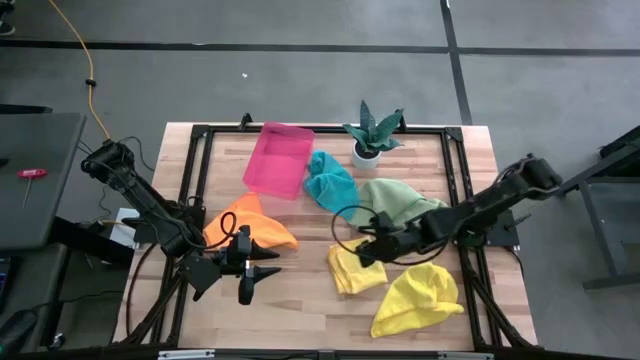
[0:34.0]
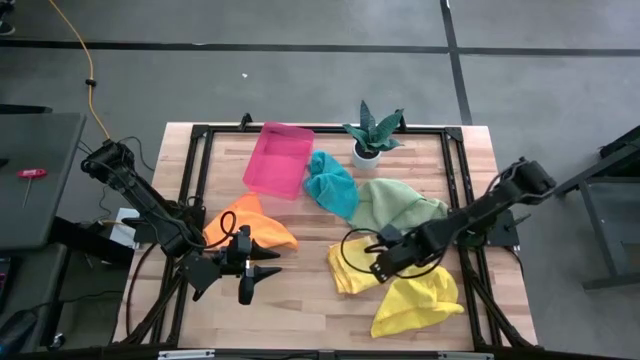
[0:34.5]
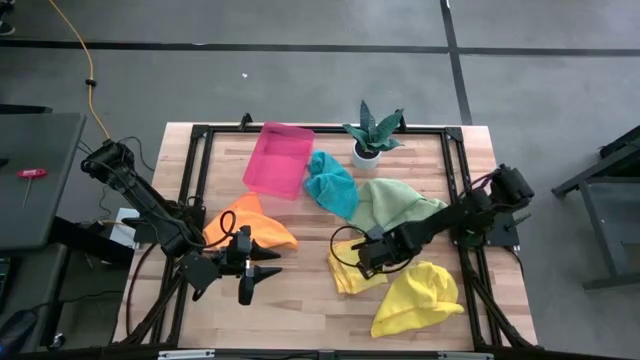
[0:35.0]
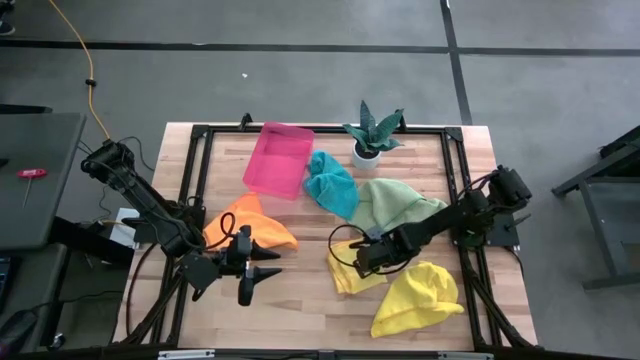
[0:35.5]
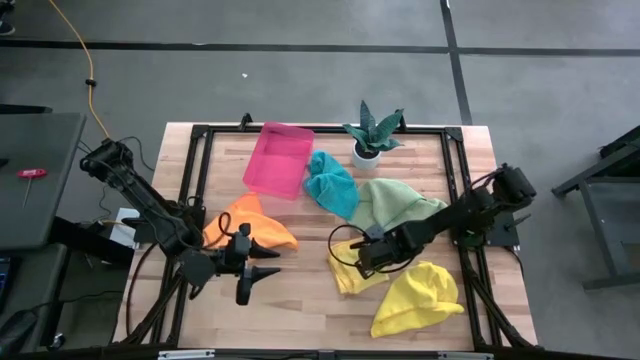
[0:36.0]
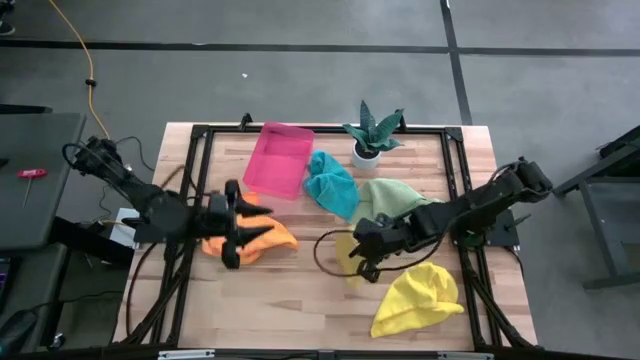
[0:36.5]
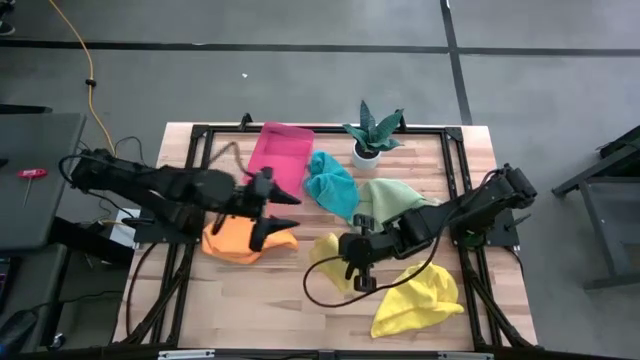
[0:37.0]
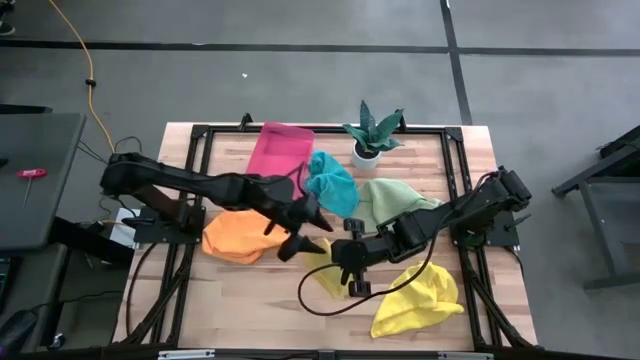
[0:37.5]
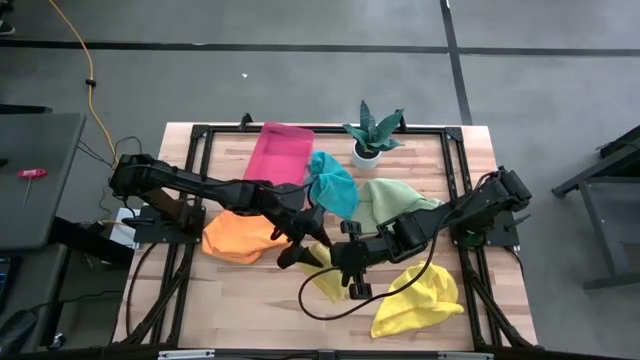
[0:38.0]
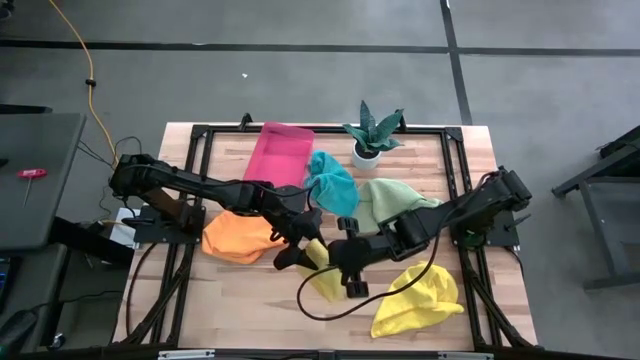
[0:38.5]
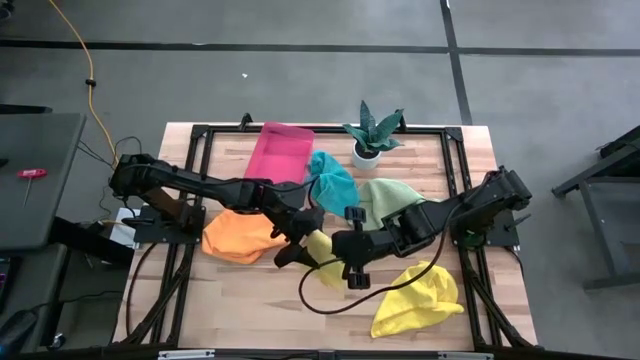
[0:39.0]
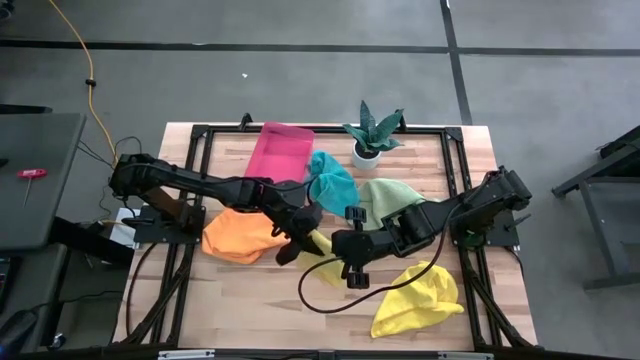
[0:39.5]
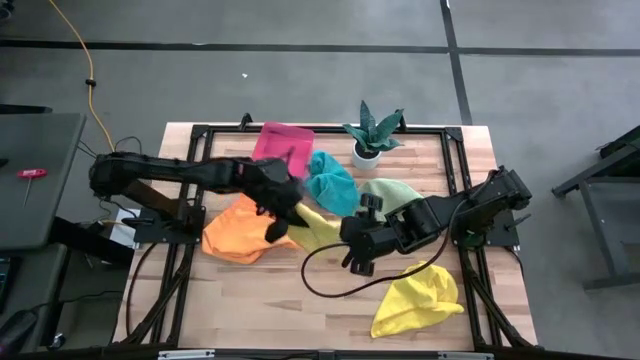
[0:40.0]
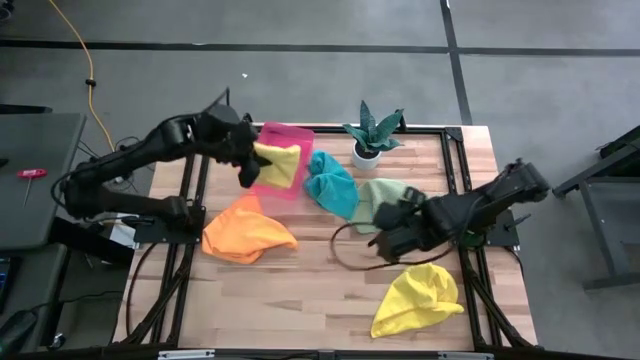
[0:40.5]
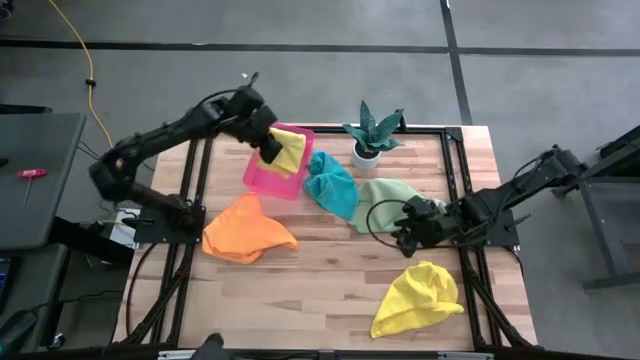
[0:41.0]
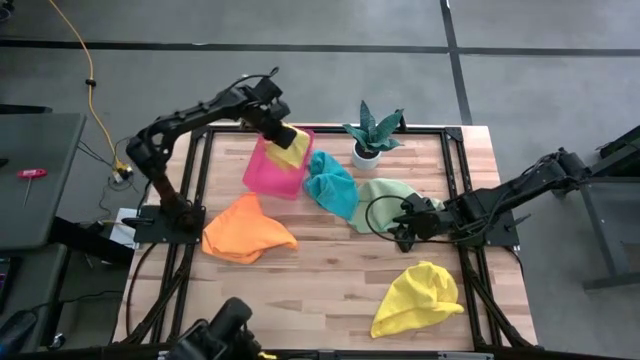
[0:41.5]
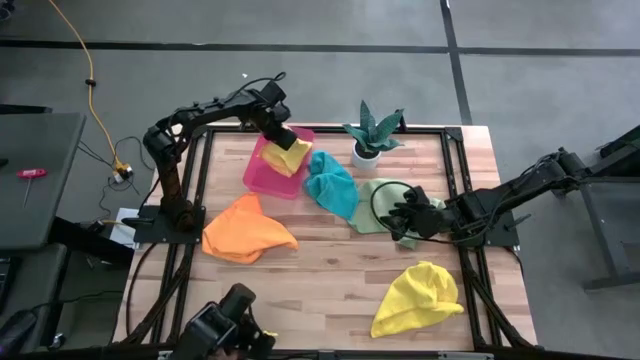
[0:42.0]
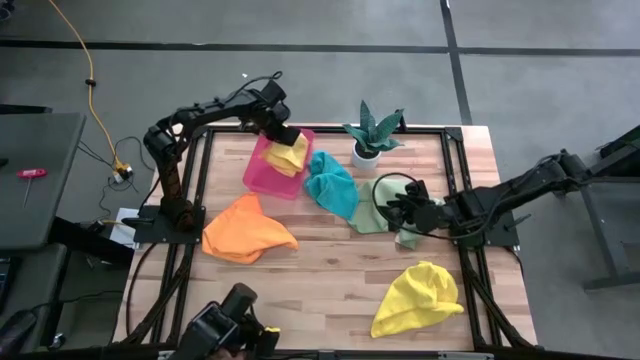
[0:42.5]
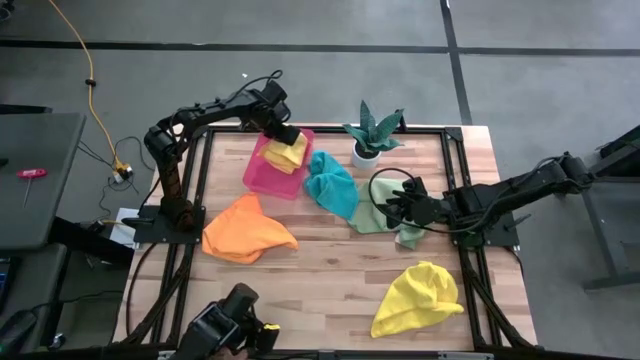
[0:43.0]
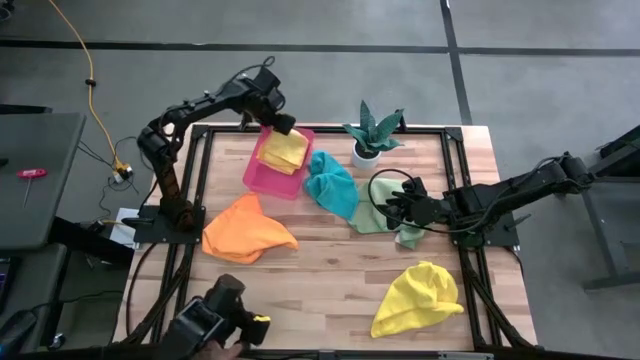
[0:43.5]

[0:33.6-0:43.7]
Task: Fold microfiber towels
Put the left folded yellow microfiber cloth into the red bin

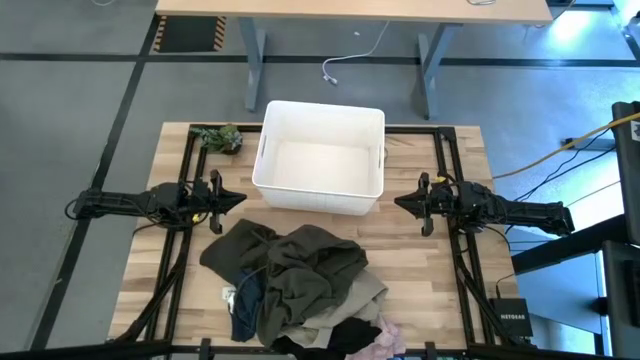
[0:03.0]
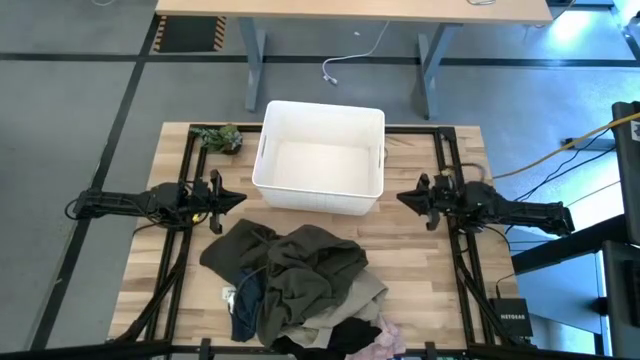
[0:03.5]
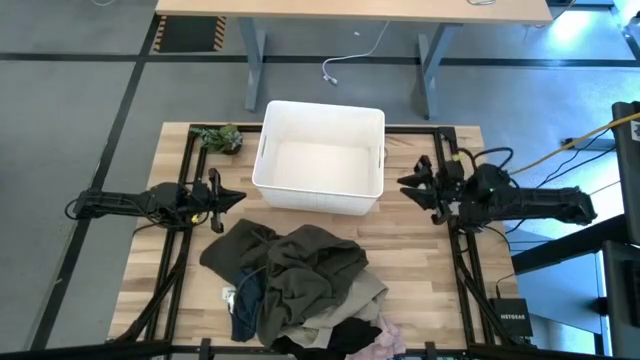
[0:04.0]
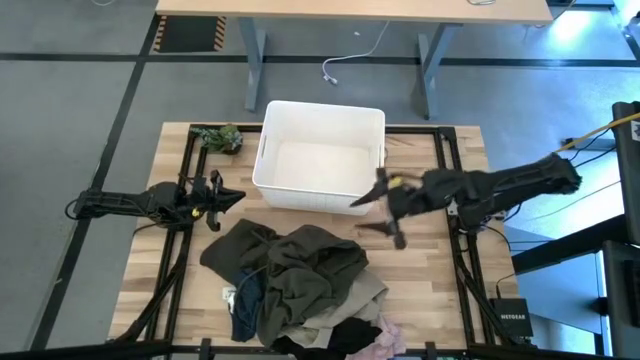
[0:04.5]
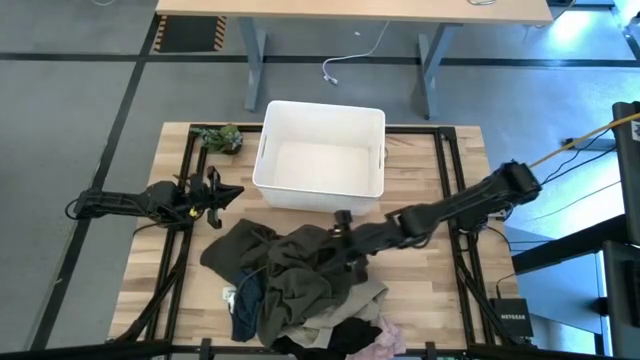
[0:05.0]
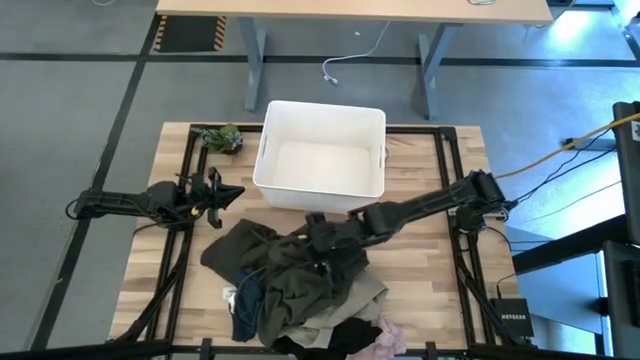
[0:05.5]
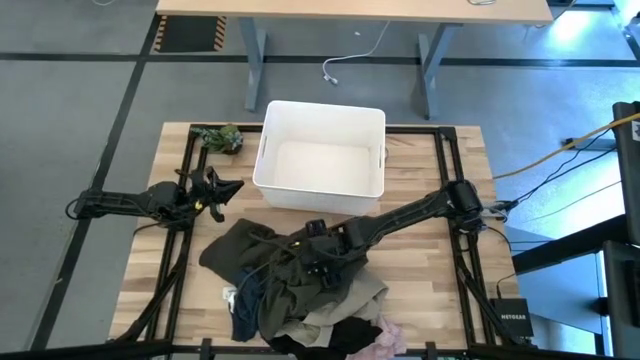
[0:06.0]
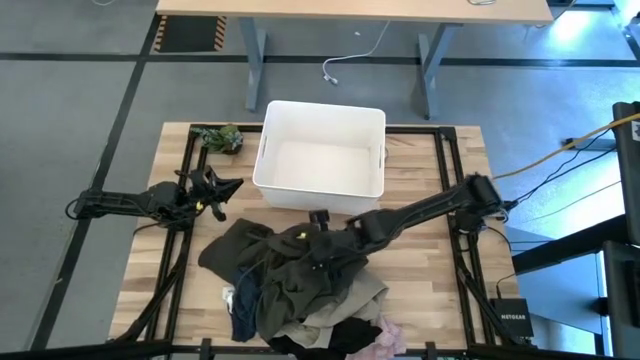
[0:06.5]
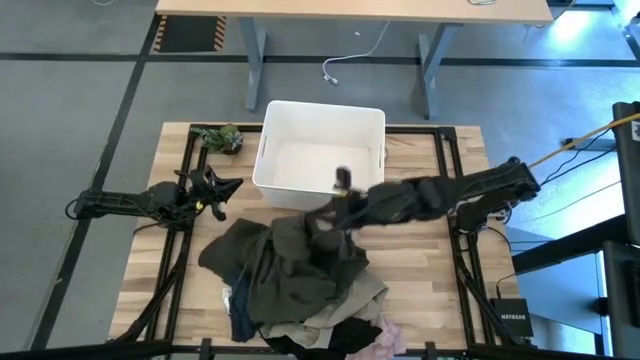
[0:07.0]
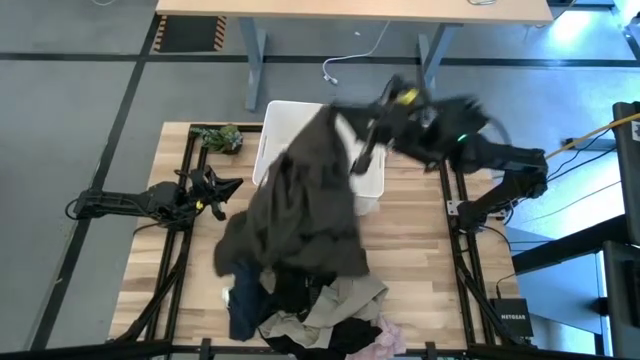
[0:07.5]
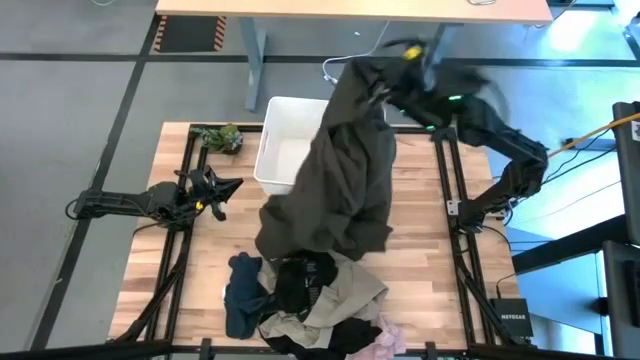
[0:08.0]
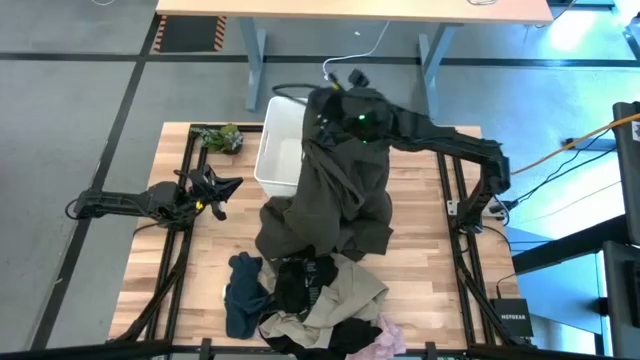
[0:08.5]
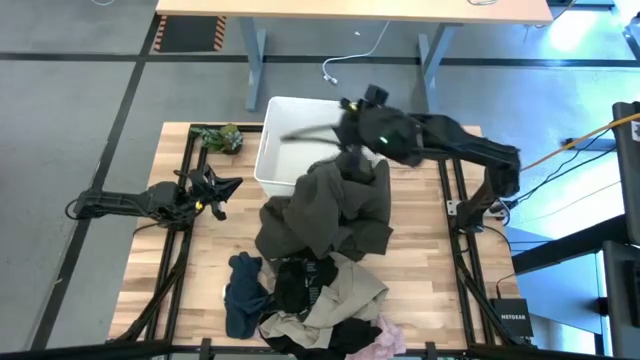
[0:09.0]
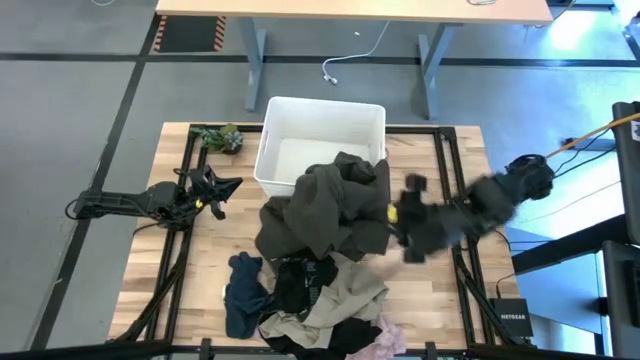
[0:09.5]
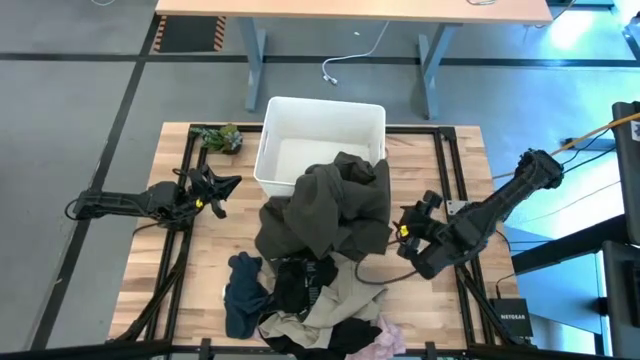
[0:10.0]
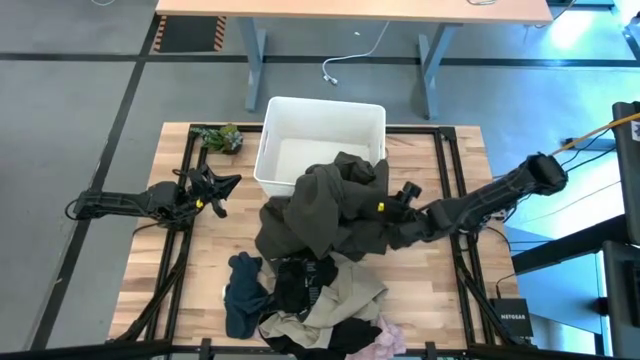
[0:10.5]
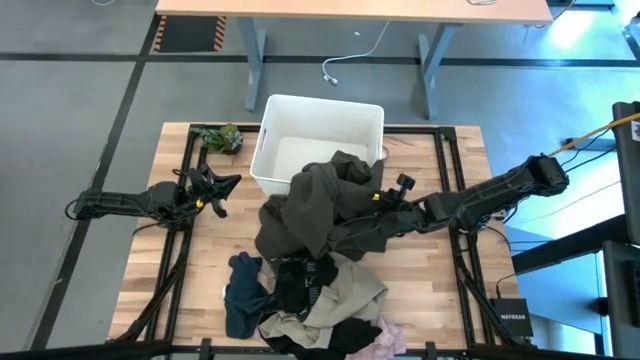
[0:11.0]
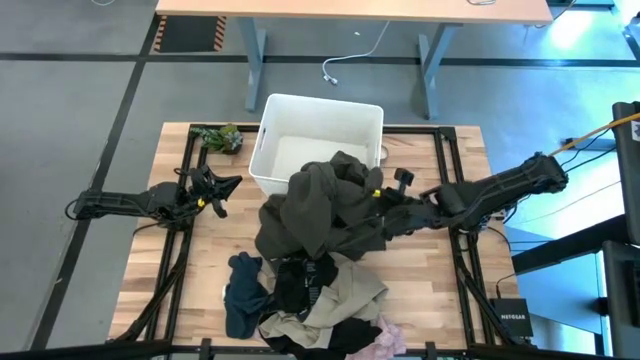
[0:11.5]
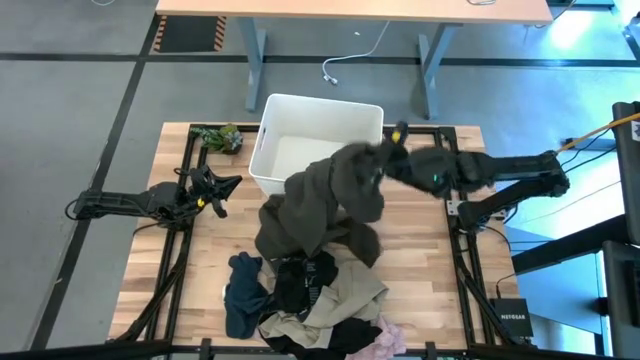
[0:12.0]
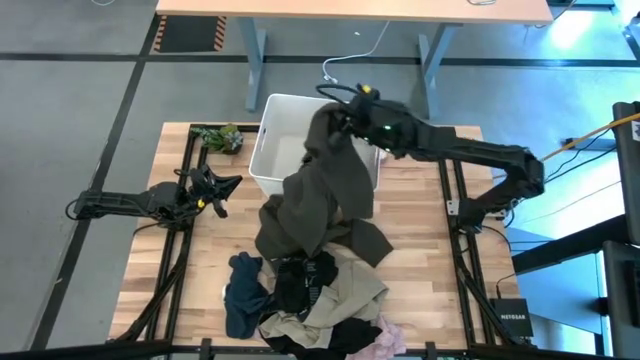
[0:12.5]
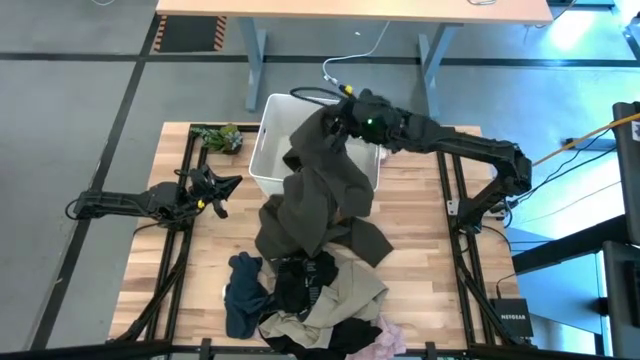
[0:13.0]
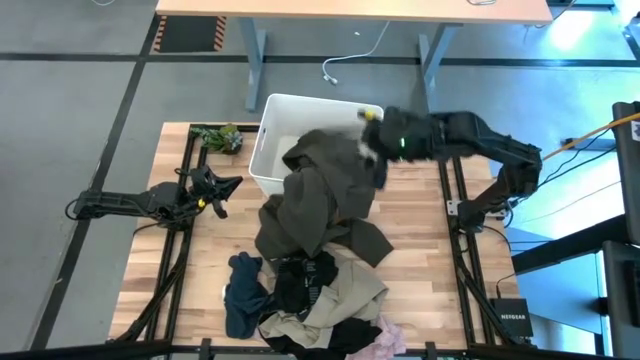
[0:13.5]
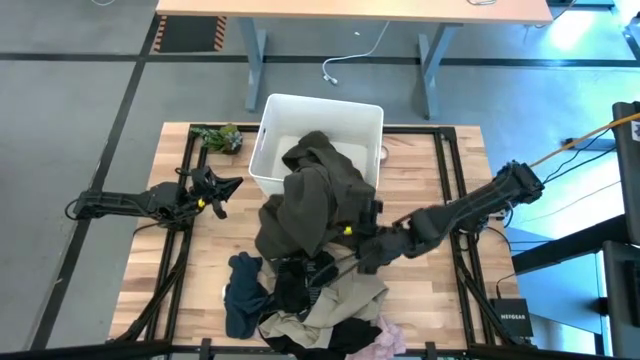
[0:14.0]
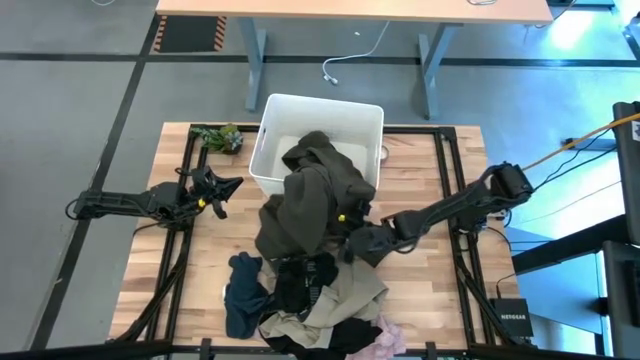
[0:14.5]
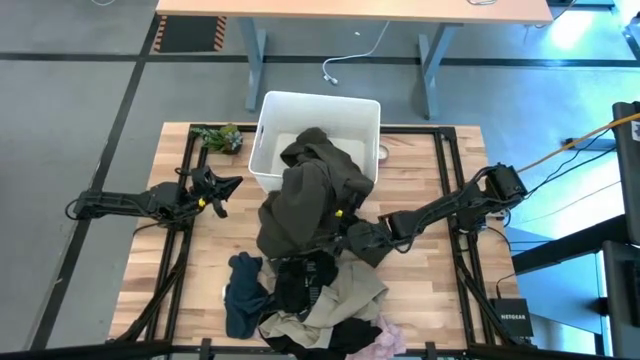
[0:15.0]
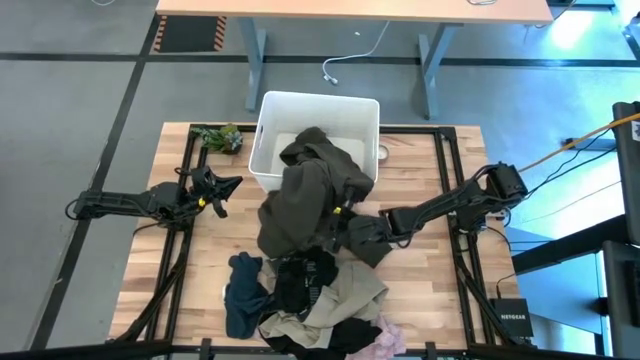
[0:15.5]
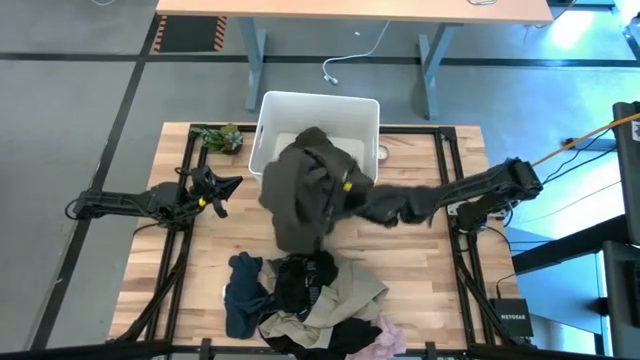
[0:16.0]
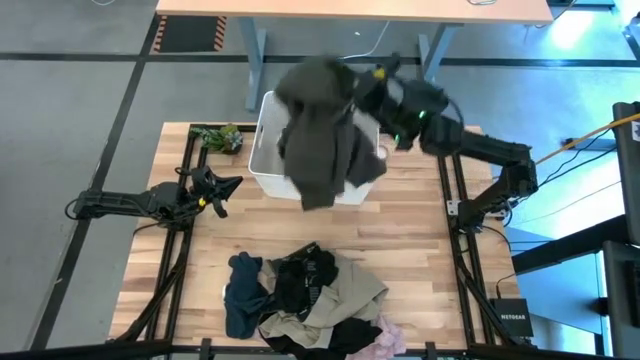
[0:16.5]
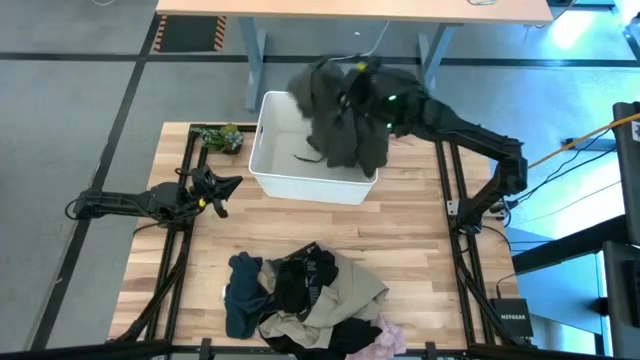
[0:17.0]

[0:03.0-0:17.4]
Task: Sort clothes
Put the black hoodie jacket into the white bin
